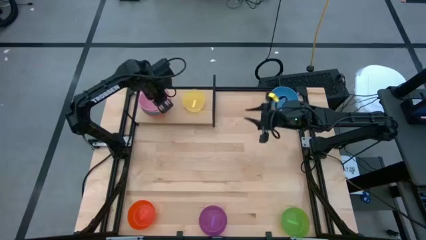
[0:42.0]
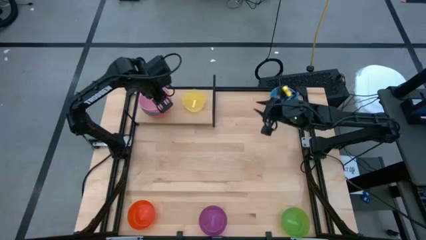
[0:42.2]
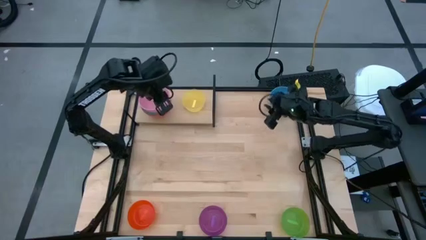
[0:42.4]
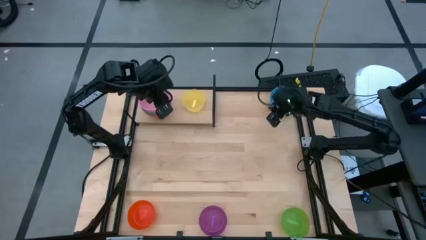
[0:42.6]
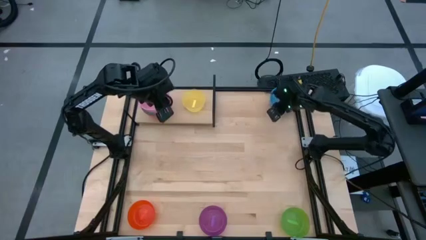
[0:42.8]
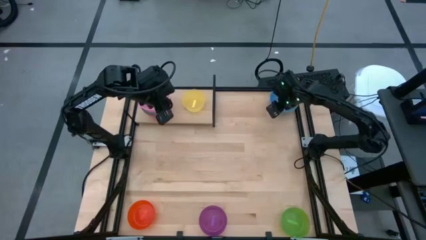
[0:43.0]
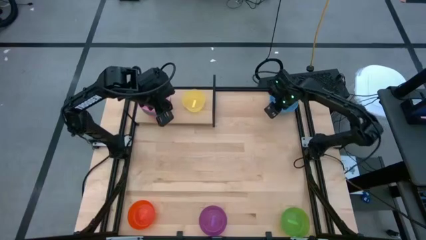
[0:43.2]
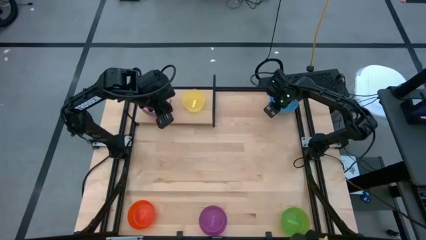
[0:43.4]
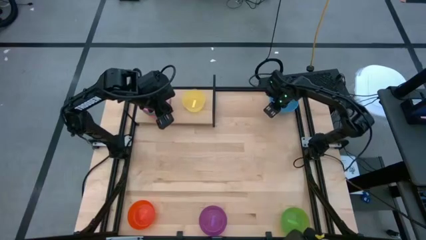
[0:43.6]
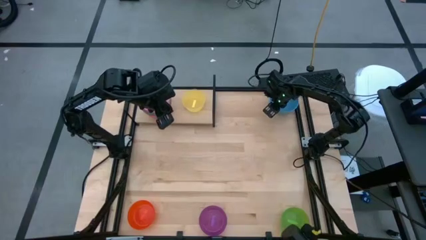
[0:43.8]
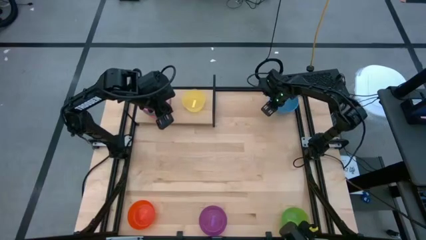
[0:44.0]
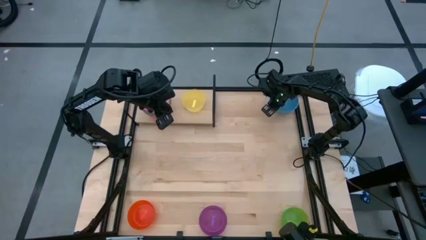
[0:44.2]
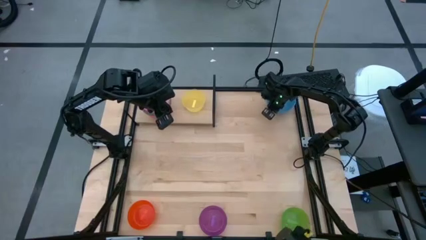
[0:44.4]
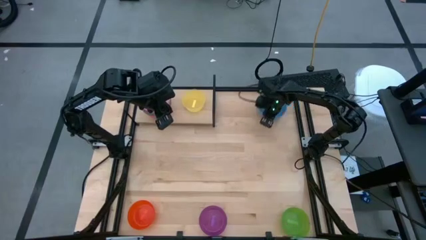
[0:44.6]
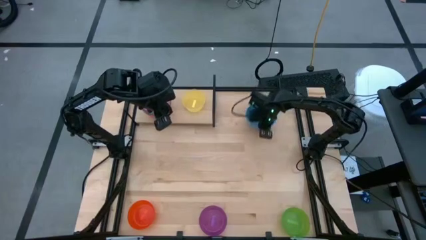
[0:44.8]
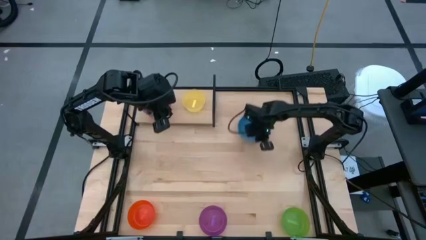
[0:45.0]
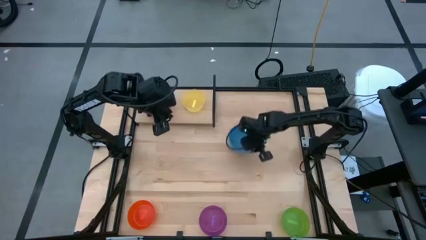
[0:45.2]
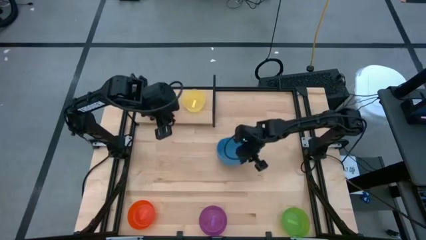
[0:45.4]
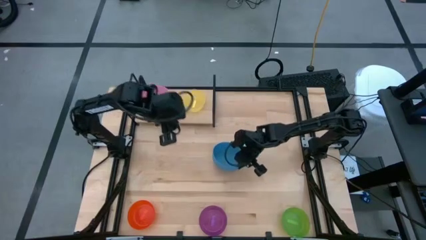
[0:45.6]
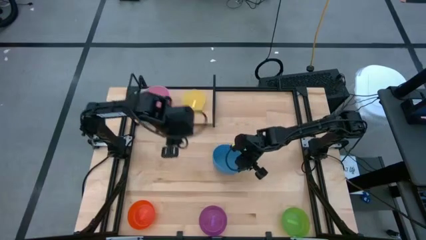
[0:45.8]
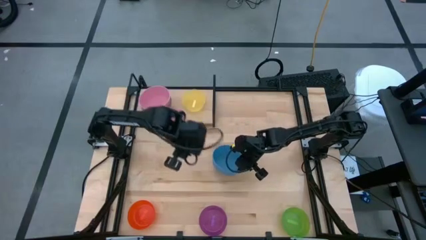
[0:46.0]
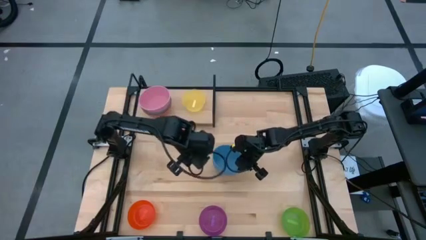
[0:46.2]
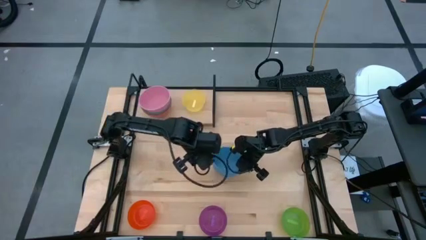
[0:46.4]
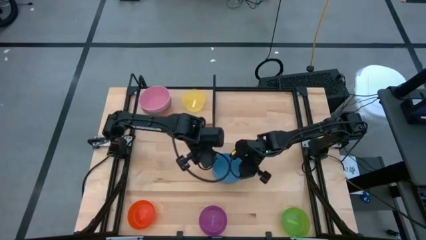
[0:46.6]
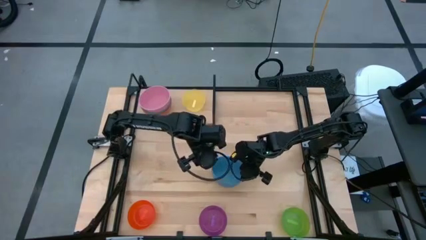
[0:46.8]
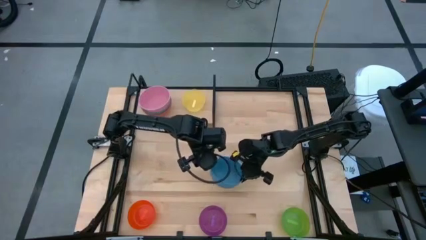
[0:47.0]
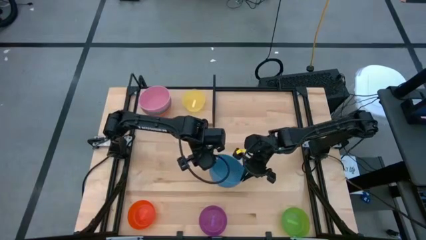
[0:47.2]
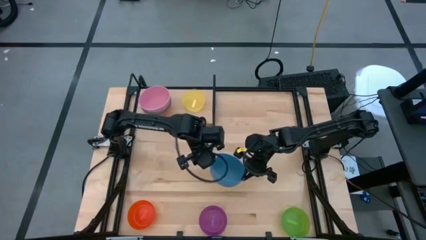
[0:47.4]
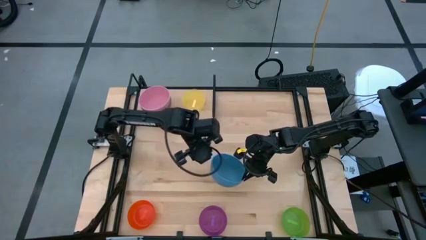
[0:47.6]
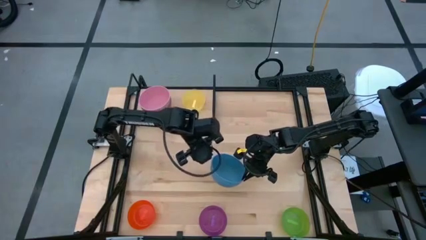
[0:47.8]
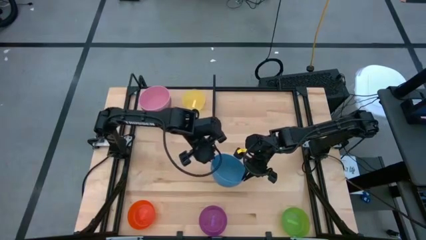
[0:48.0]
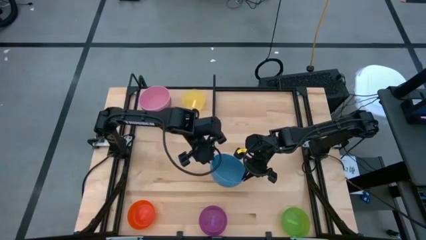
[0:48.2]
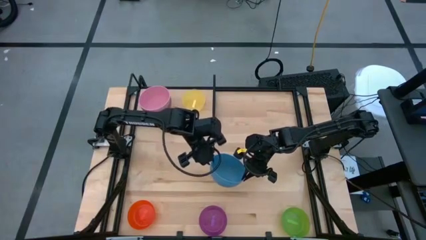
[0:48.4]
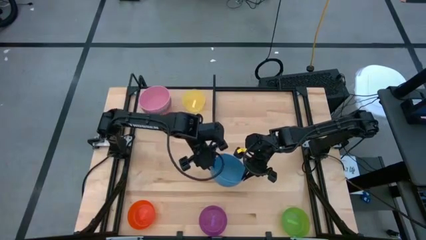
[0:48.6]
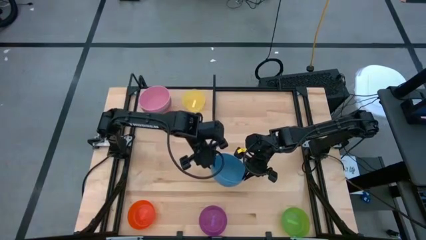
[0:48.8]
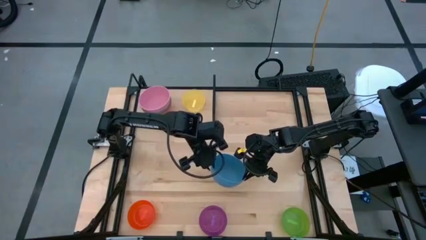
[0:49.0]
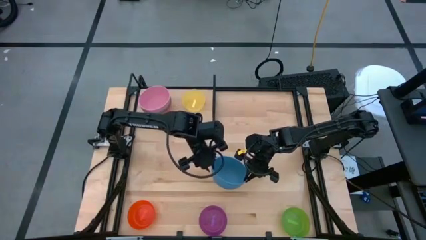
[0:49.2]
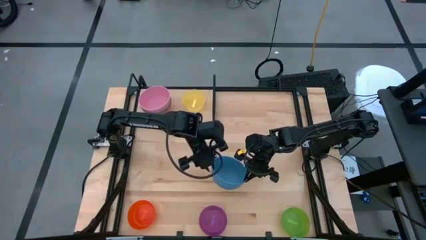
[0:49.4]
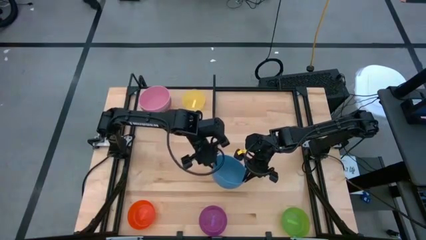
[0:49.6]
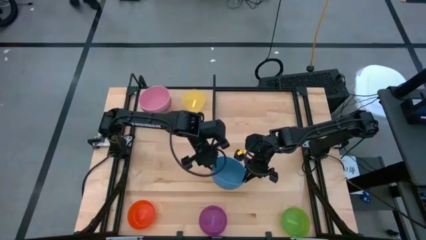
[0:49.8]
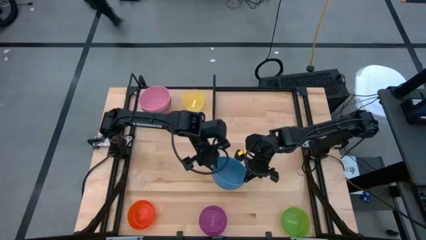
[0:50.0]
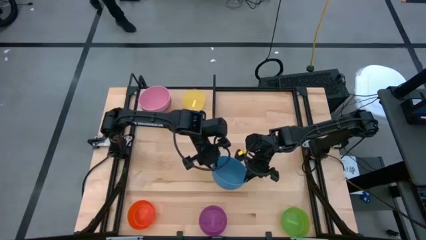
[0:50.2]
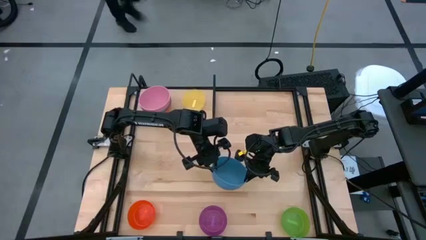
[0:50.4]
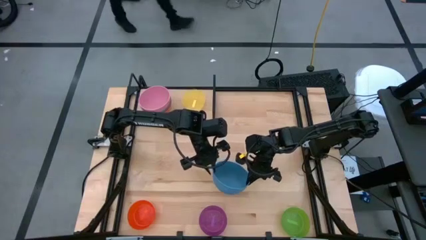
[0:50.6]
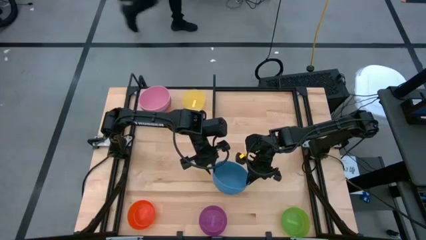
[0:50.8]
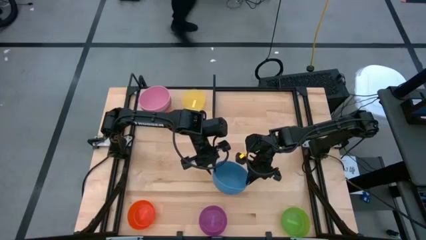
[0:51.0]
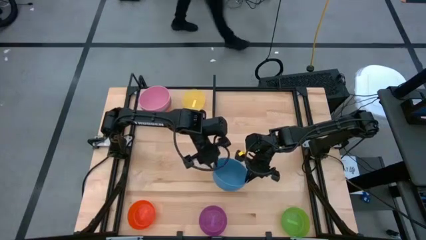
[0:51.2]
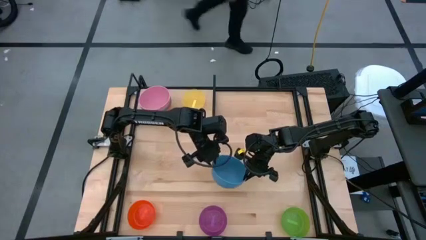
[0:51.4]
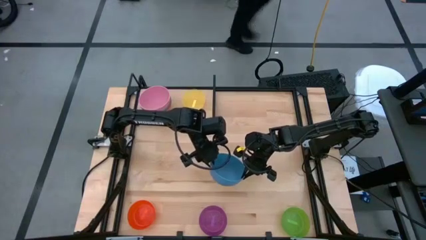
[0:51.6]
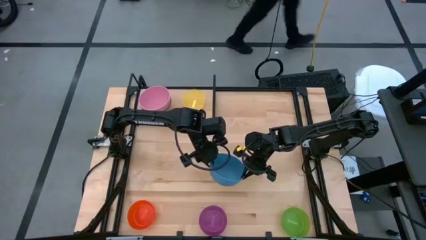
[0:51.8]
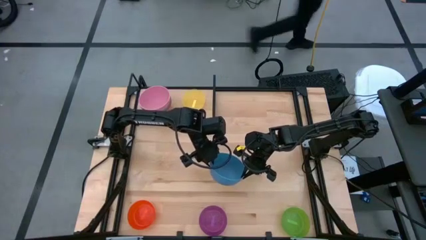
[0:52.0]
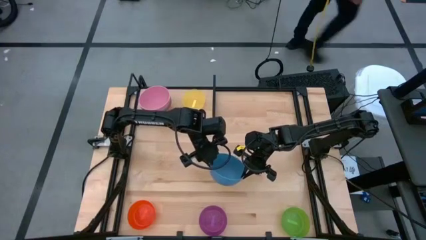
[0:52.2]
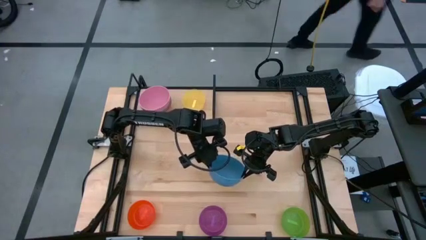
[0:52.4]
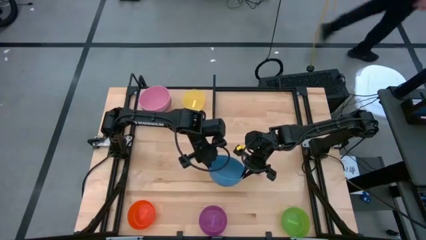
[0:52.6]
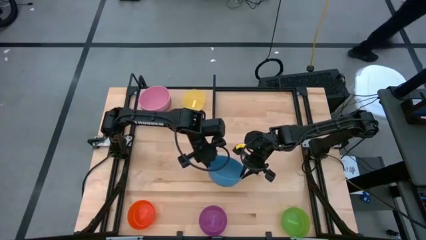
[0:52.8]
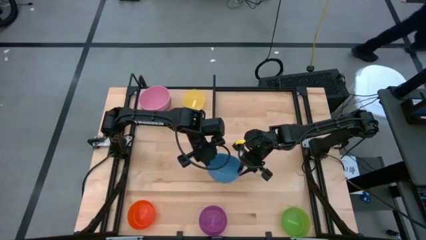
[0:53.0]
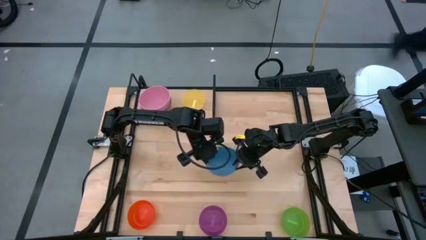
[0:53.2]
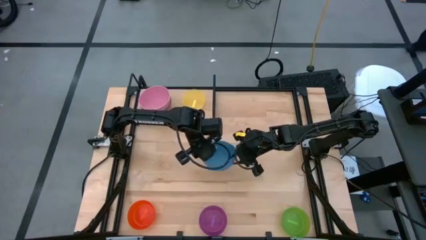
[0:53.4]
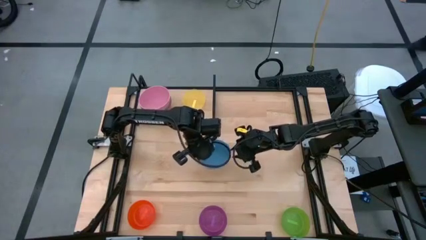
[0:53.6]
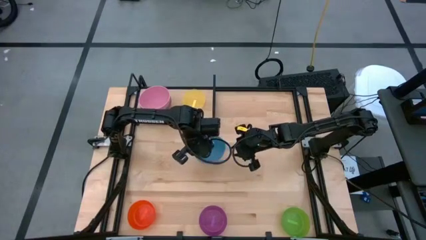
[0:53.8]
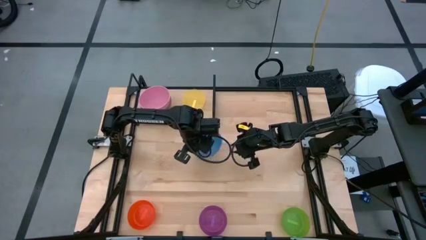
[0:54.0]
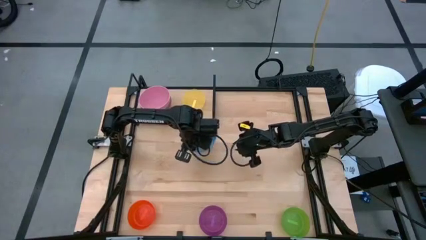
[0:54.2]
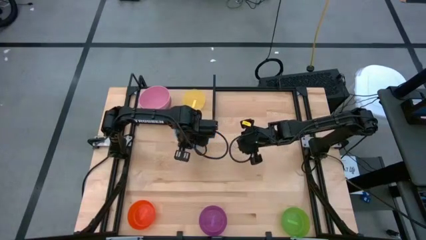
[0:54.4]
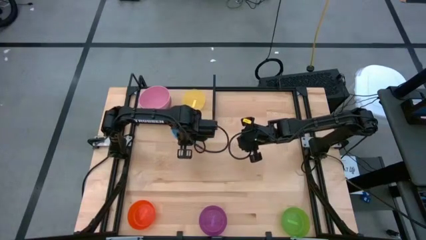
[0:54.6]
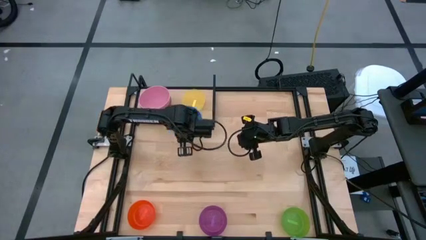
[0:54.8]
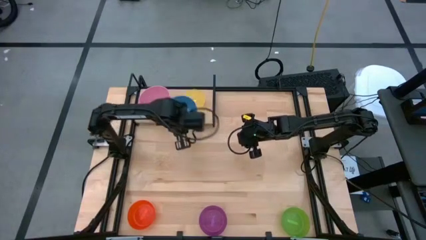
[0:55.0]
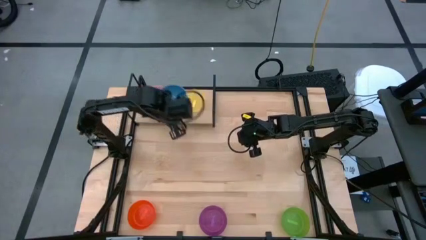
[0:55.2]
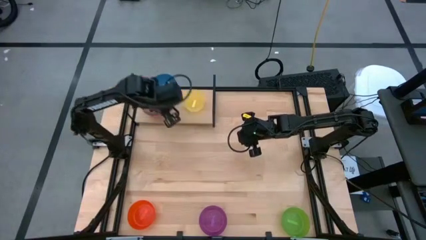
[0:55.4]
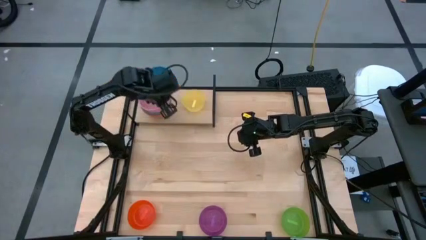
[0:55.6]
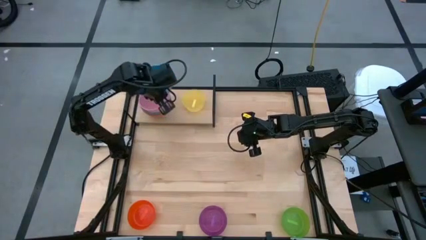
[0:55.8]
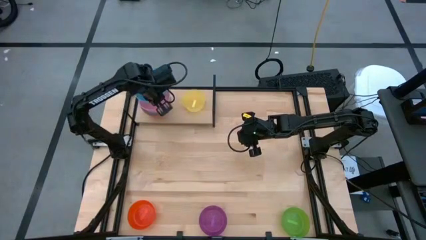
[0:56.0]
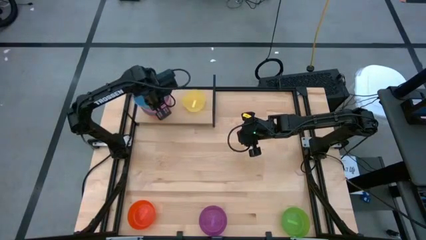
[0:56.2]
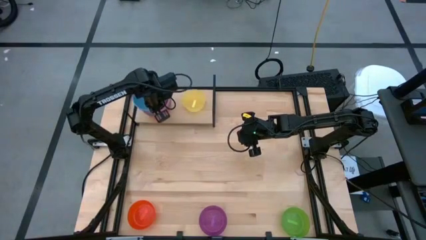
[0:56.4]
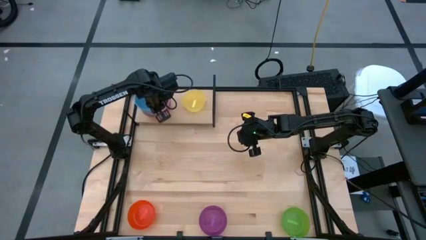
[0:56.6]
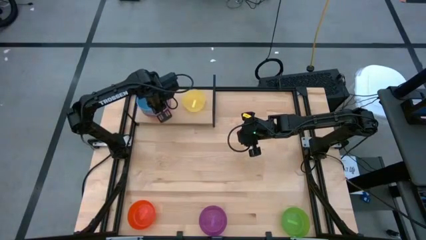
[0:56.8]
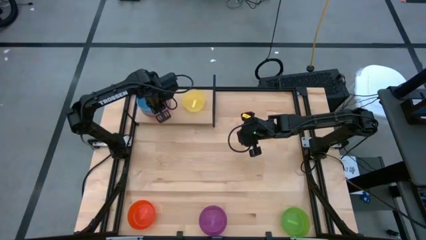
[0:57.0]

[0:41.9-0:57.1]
Task: Place and stack bowls onto a shelf
Stack the blue bowl on top of the pink bowl on the shelf

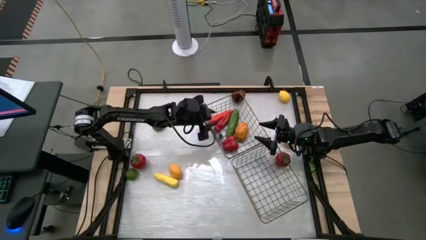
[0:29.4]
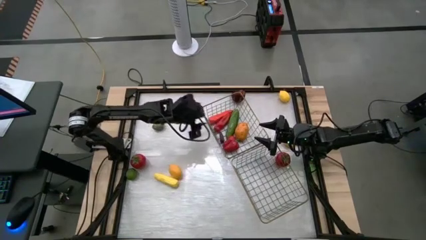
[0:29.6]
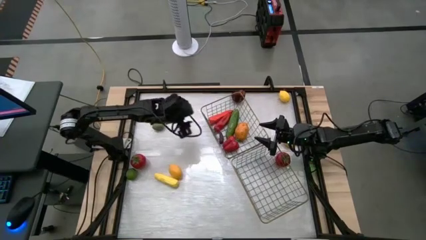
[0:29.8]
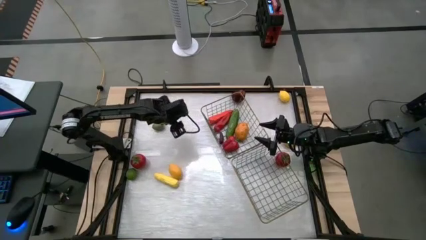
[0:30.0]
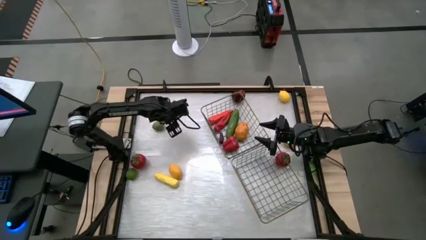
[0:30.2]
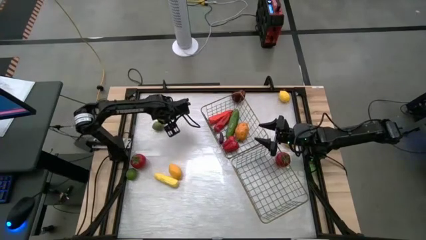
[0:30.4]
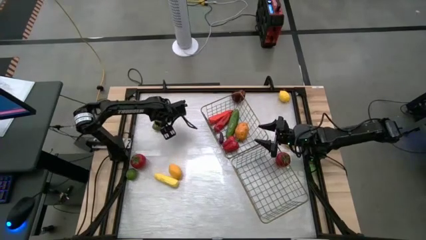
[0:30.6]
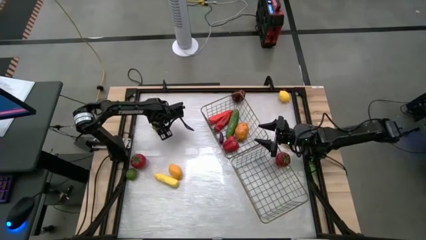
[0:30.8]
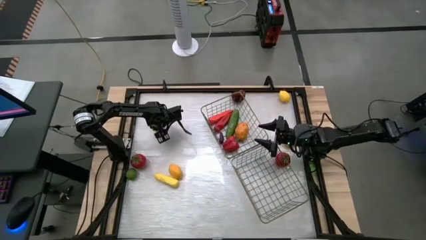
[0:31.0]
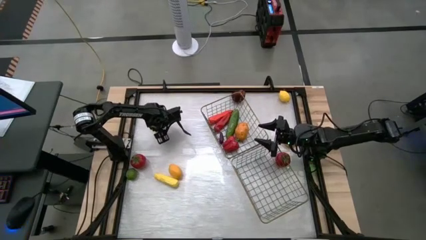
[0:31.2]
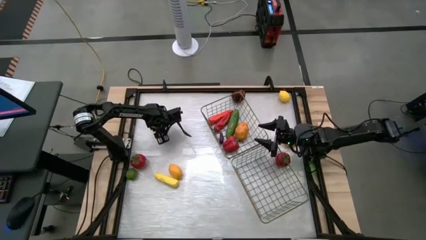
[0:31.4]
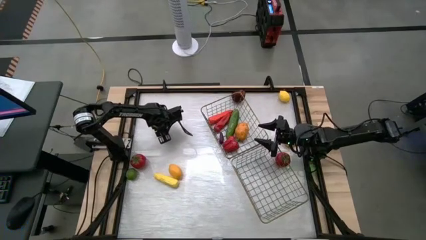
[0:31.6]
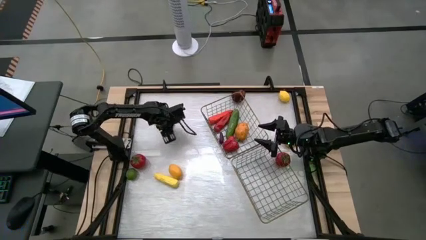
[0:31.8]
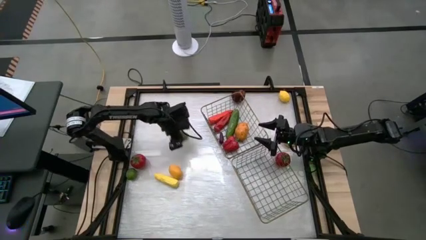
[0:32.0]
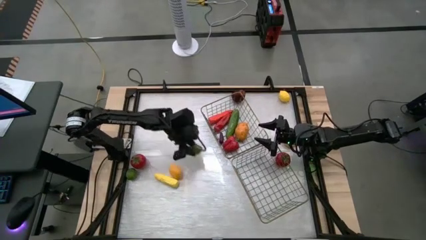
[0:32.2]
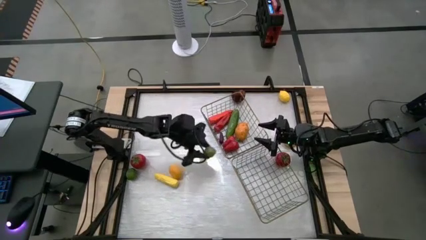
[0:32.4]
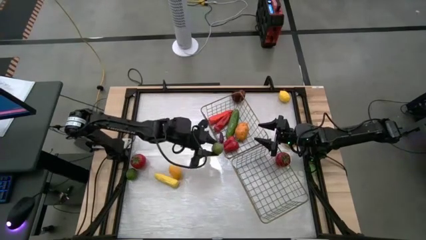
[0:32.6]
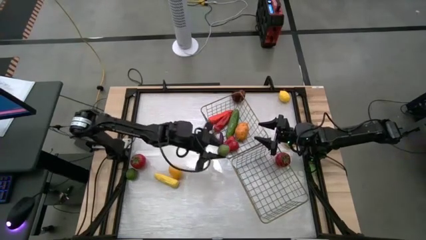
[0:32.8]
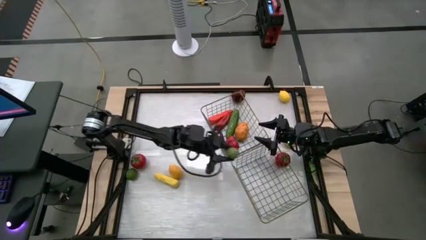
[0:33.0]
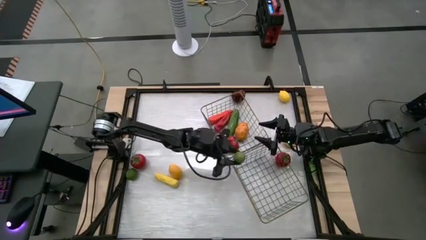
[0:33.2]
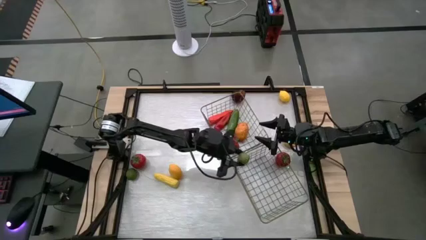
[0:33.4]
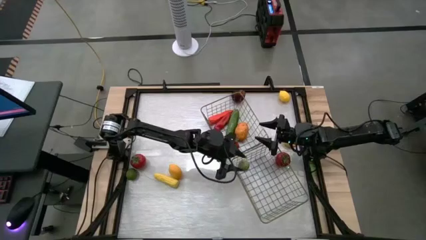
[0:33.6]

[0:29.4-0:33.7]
Task: Sort produce into baskets
Put the top lime into the right wire basket
